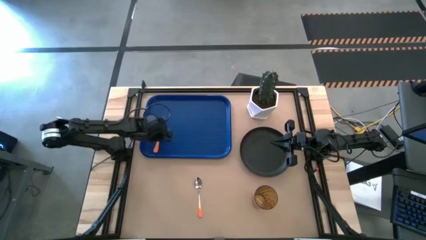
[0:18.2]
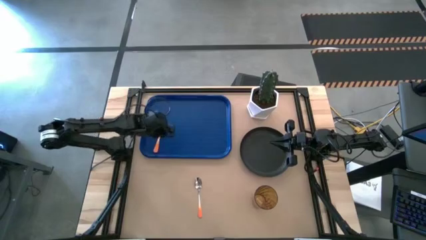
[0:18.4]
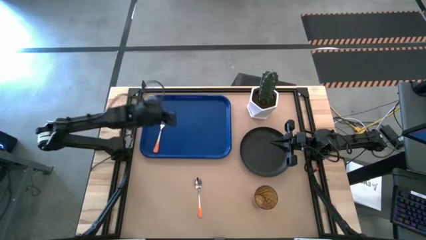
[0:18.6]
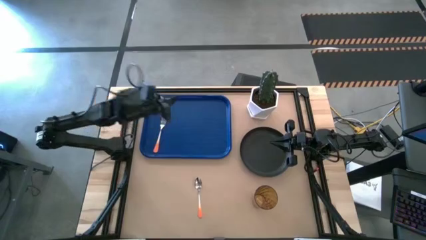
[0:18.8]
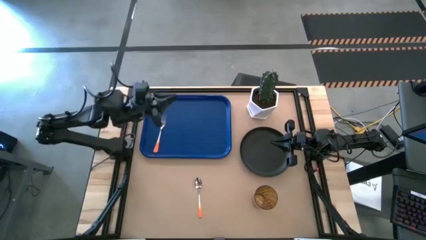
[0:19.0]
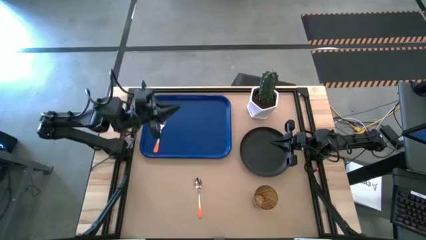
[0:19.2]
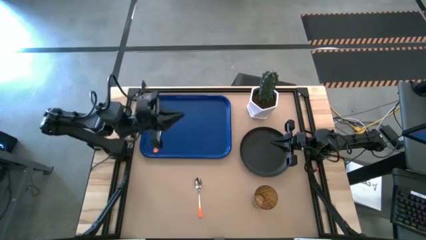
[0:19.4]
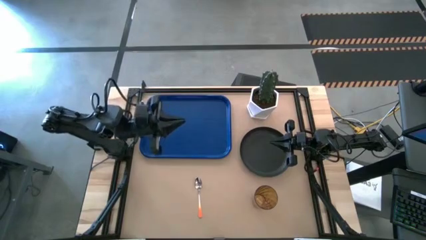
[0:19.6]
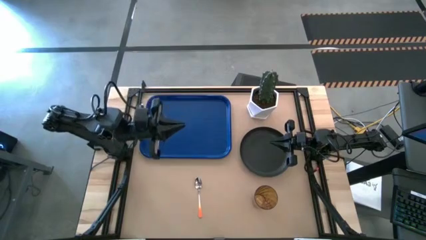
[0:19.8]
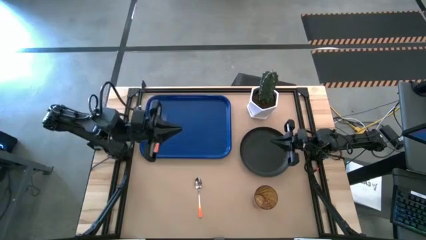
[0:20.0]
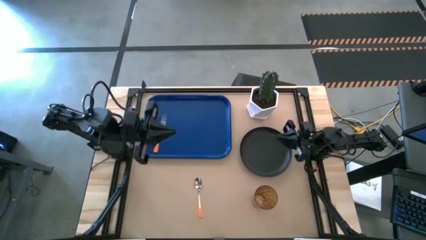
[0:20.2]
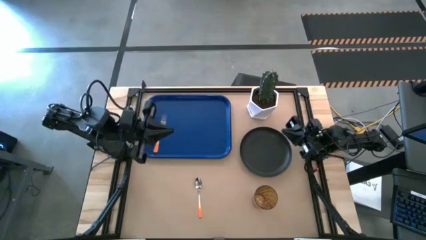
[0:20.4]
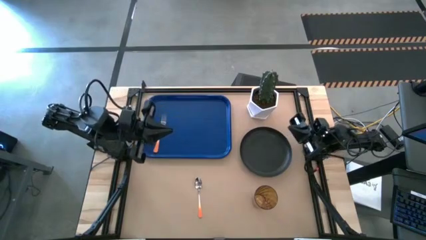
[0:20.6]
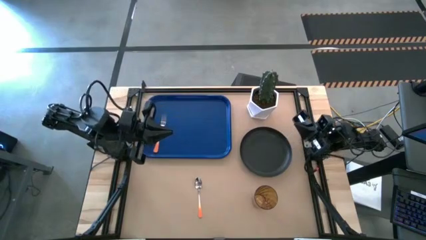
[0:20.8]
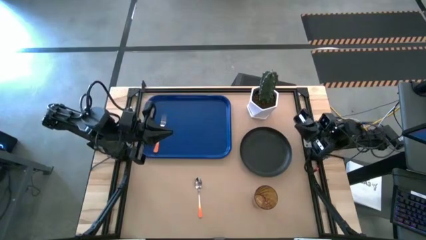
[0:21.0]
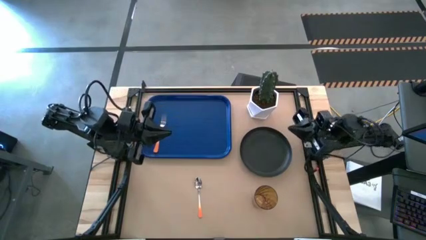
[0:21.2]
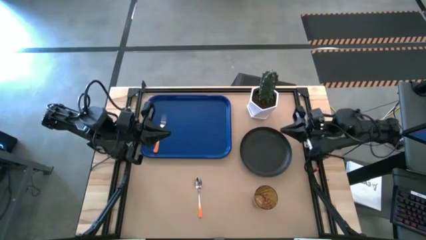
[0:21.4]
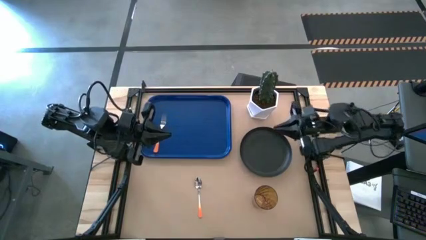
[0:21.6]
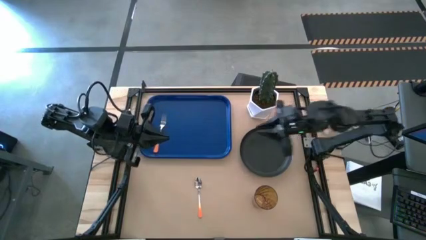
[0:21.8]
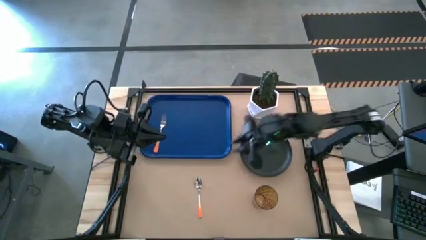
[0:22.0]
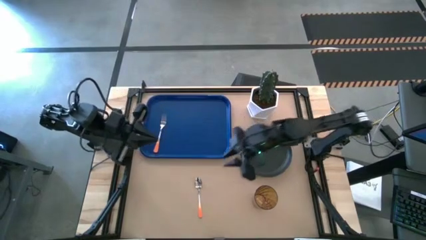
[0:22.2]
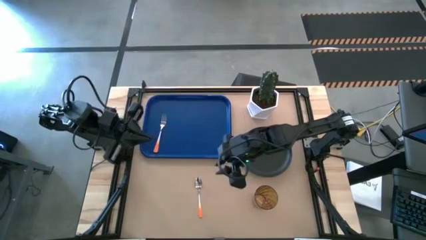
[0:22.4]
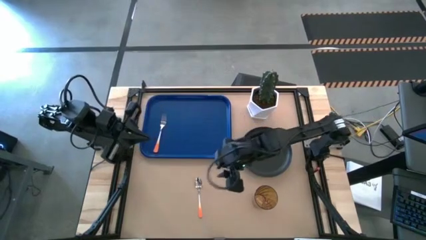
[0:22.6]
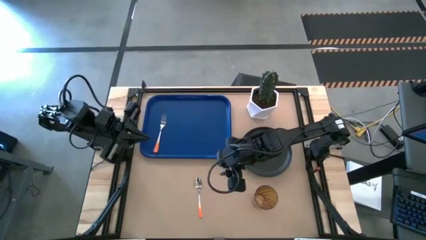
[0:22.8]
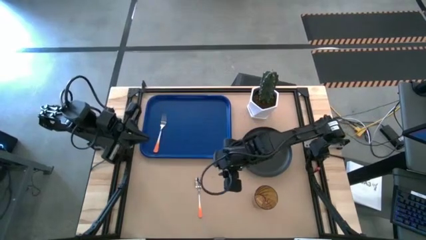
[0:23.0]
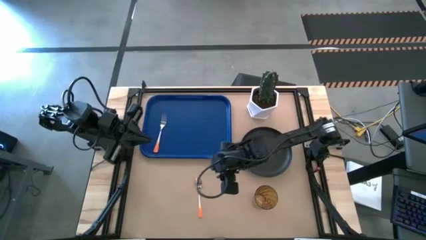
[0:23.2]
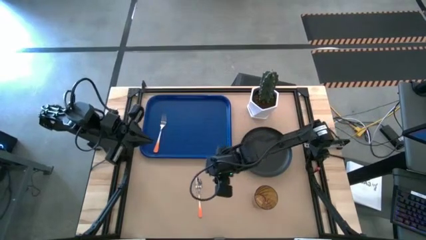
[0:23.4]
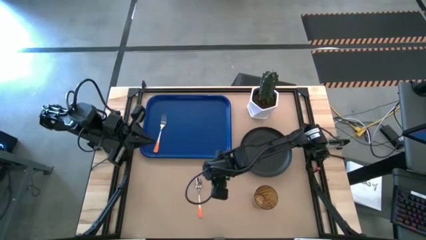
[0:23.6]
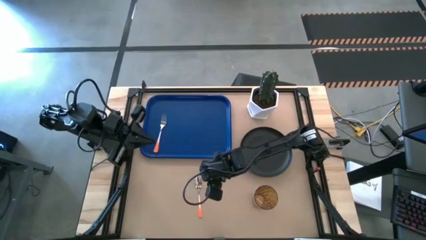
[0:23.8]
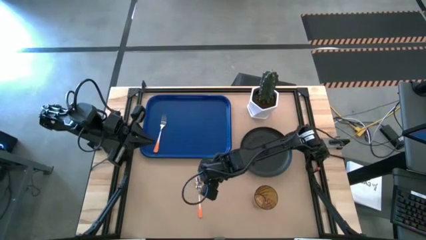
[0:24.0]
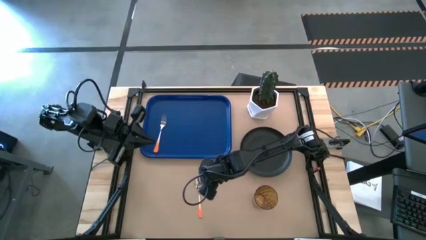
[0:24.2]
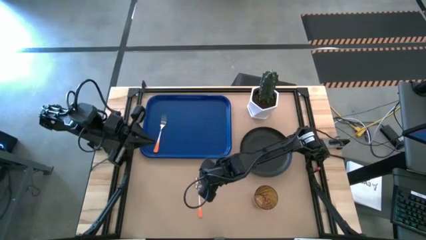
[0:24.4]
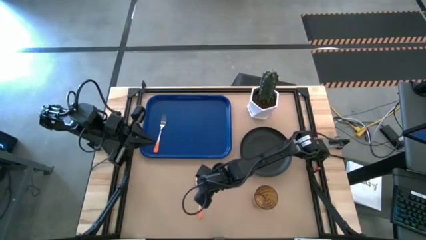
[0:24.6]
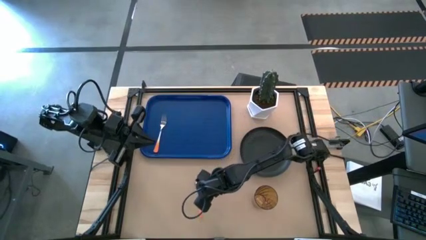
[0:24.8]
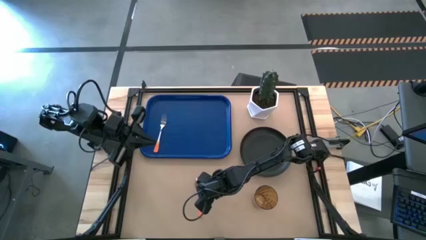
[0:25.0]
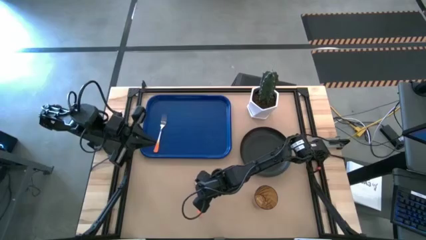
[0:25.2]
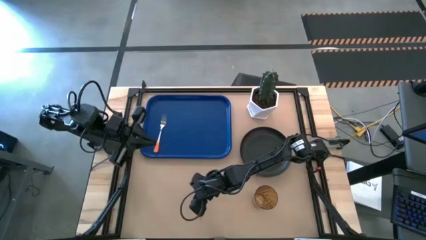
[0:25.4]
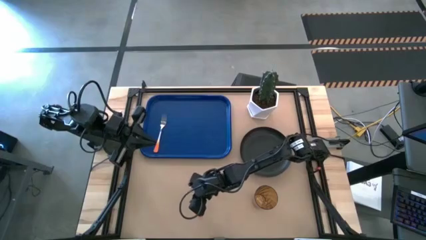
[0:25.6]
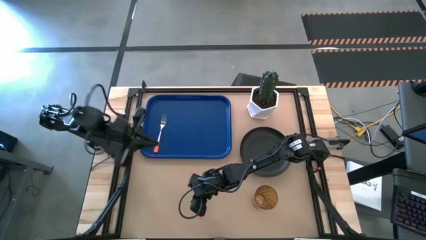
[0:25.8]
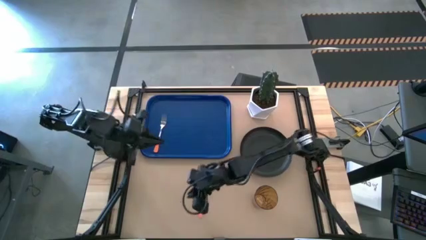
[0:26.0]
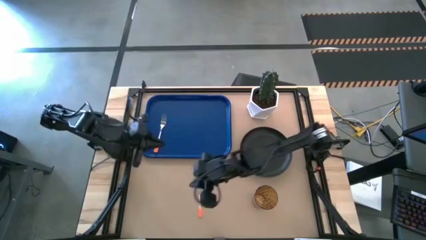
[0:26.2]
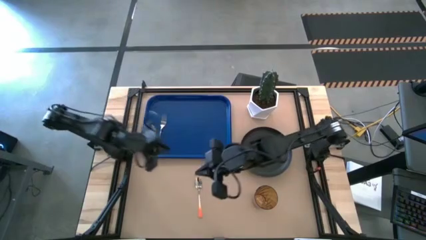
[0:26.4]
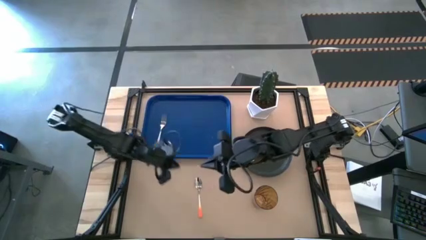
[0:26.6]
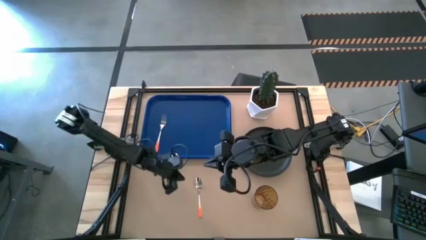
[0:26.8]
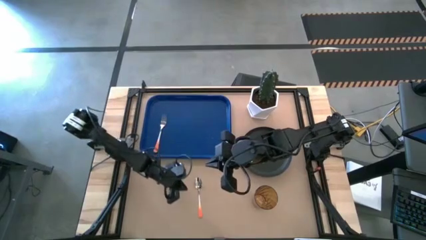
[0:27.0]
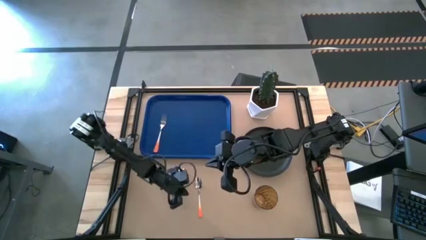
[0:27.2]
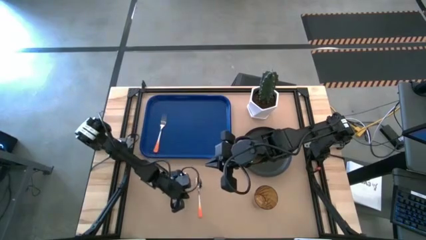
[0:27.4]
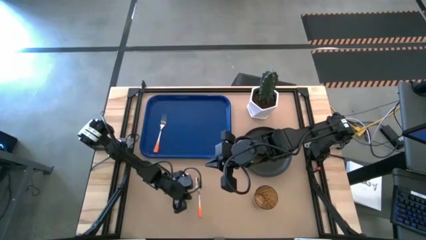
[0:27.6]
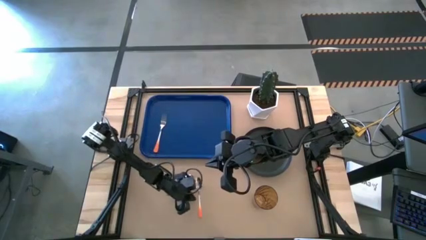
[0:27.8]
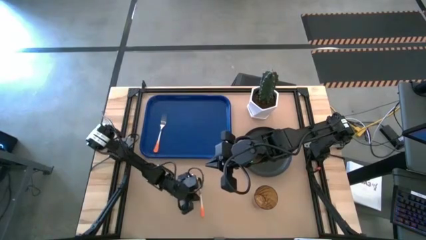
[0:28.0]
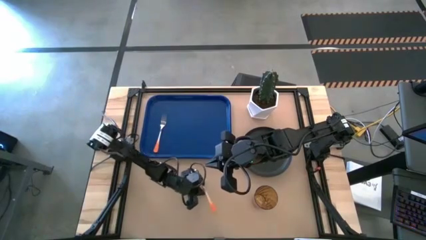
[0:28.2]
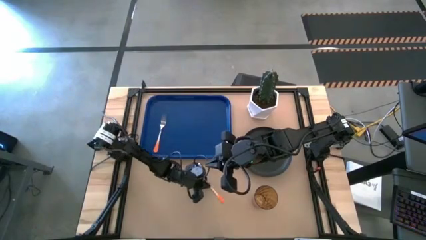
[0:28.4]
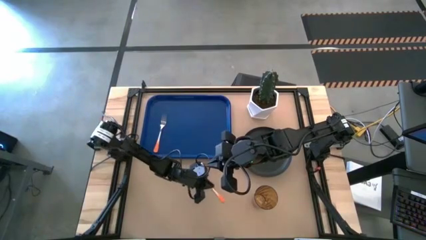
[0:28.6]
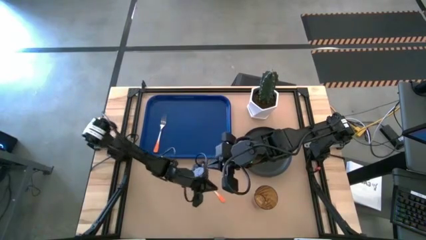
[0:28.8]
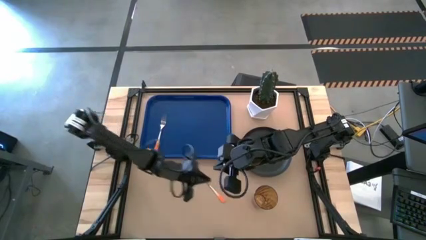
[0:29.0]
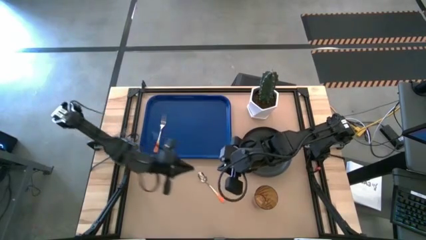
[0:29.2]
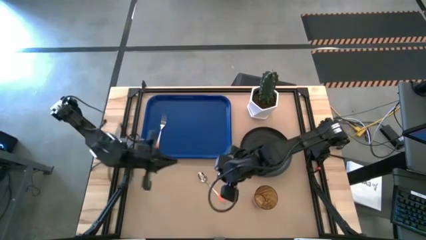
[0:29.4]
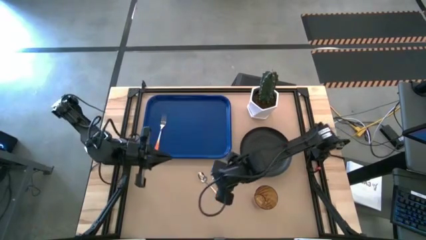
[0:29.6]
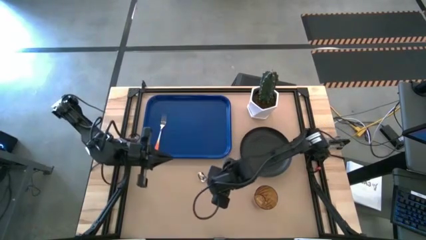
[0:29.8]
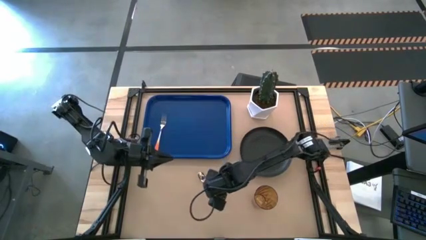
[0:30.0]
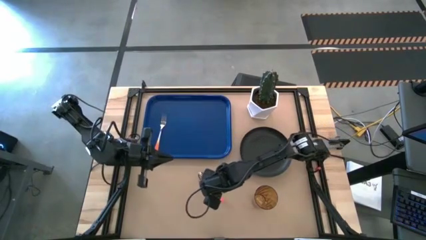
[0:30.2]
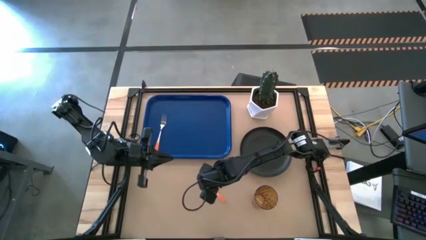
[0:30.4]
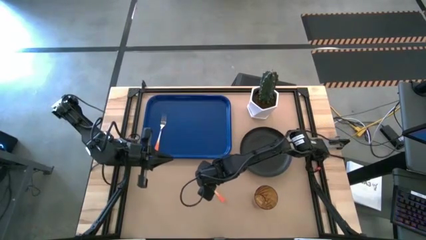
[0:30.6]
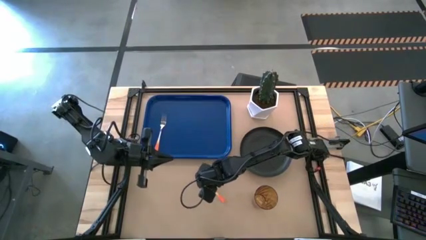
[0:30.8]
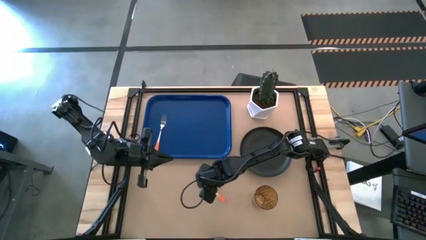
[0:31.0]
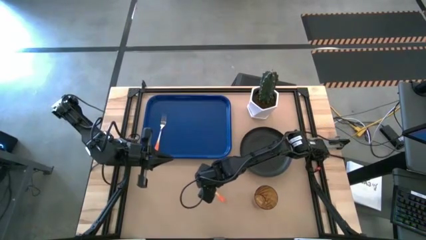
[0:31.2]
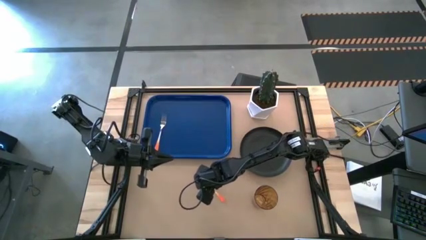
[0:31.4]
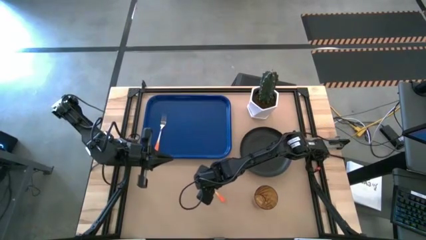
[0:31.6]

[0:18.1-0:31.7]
Task: Pick and place plate/cup/fork/spoon on tray
Put the orange spoon on the blue tray on the right of the orange fork

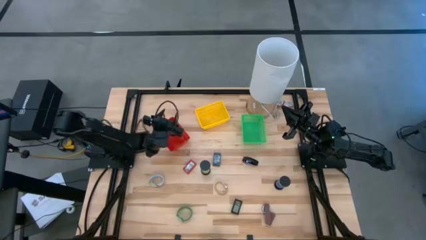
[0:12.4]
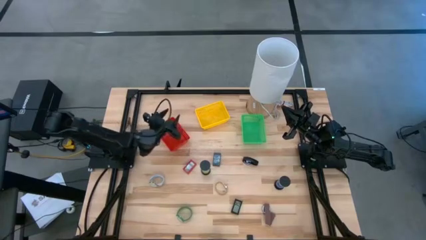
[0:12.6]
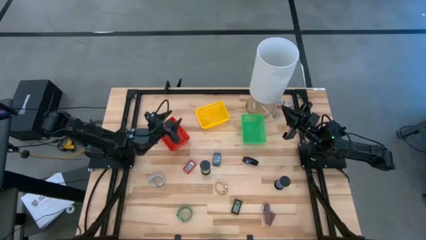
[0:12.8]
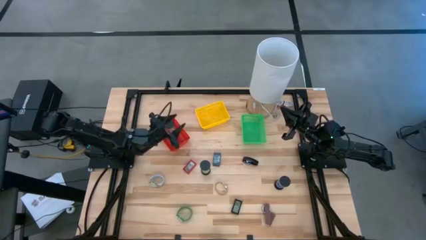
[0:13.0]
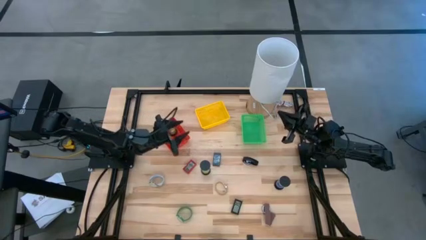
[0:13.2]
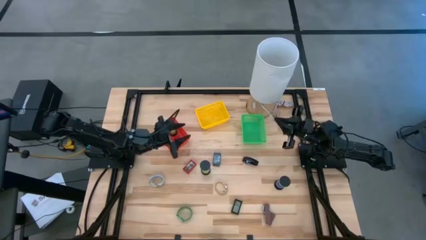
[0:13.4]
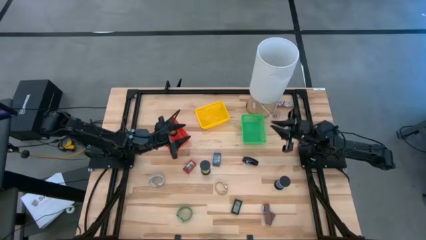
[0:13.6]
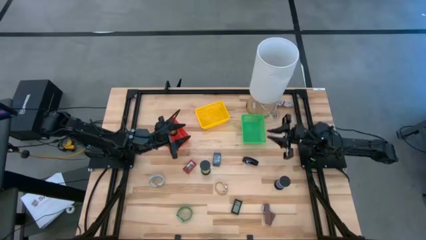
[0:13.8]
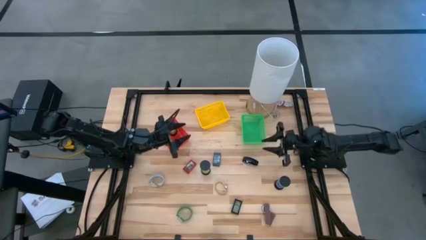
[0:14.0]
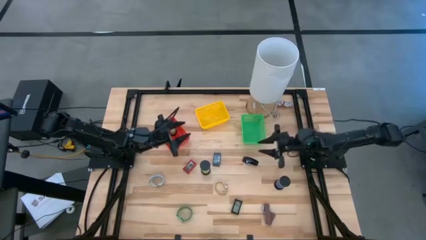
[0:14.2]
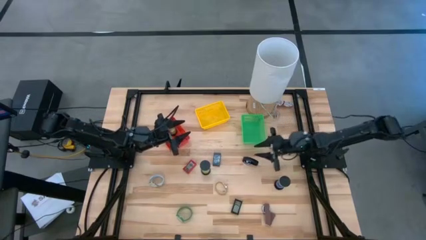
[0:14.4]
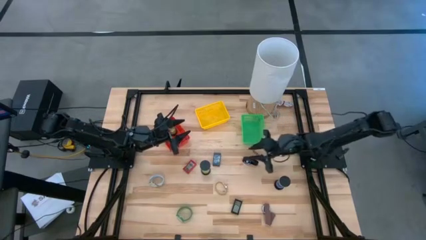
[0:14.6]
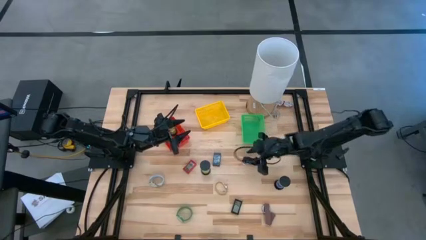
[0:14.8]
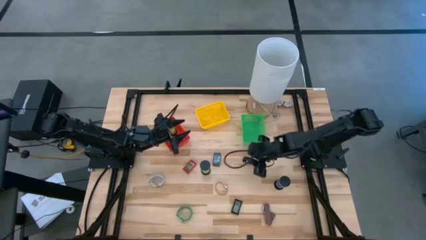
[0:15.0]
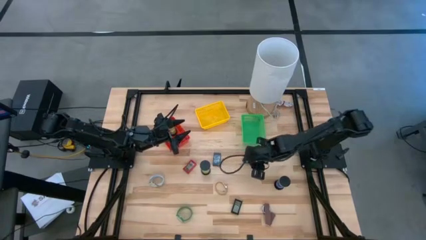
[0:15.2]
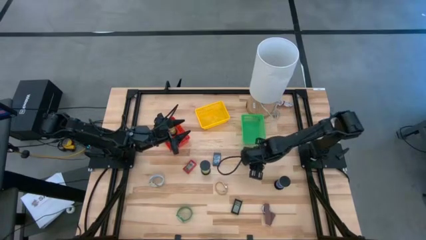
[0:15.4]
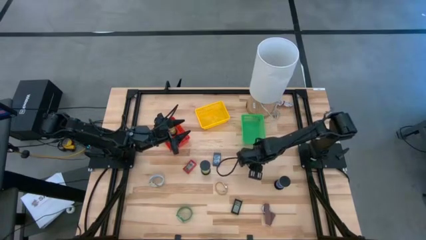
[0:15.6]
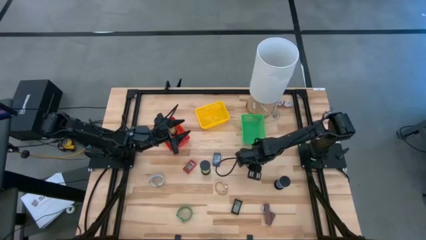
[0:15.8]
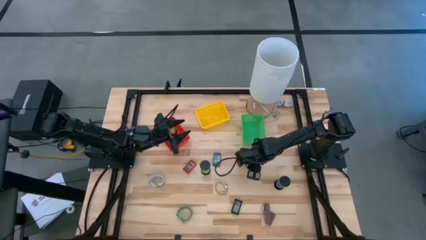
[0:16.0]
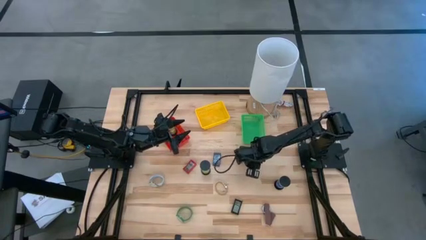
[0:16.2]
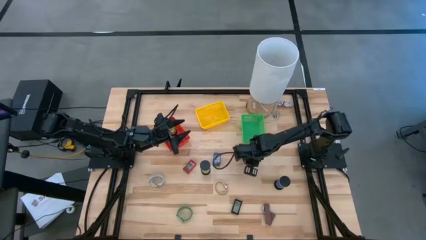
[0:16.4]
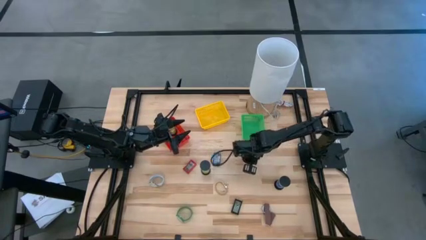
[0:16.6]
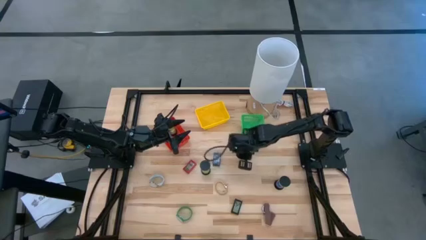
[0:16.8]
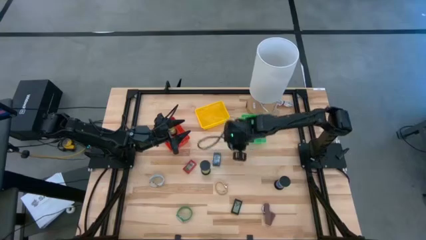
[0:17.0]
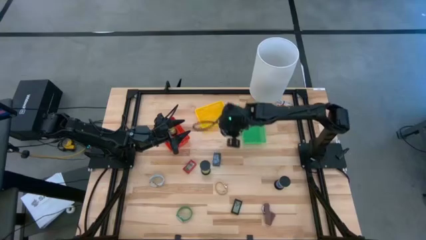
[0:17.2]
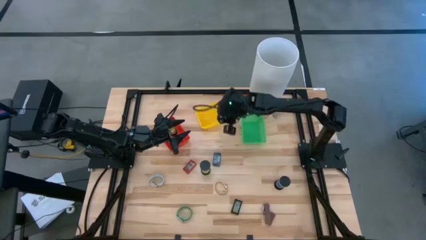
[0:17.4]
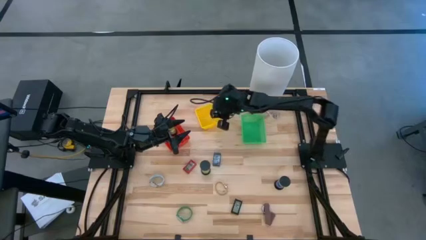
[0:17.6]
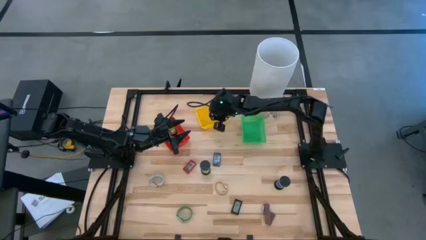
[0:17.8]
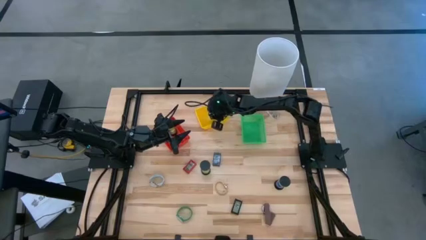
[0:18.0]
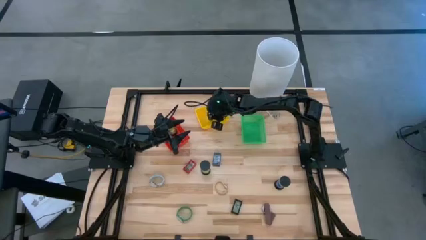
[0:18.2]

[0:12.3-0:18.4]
Task: Pick & Place Office items
Put the black watch into the yellow basket
